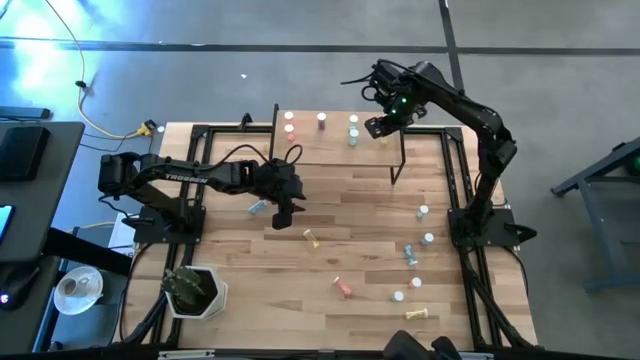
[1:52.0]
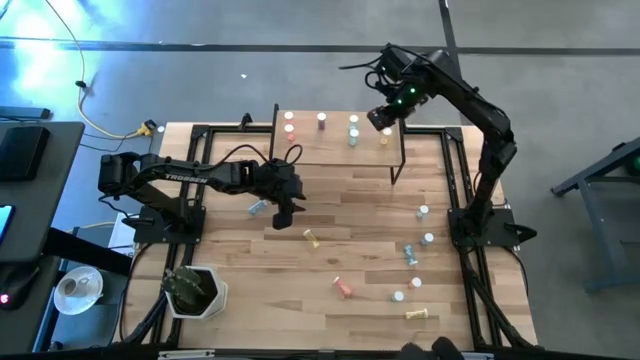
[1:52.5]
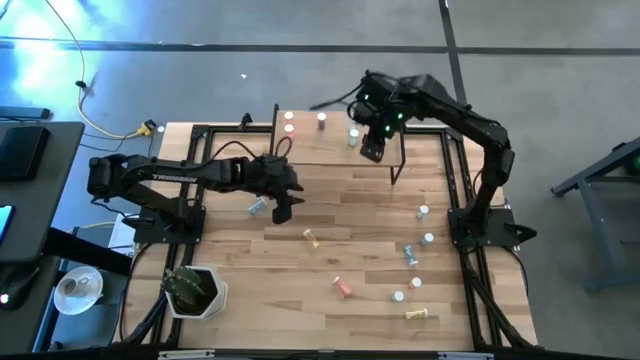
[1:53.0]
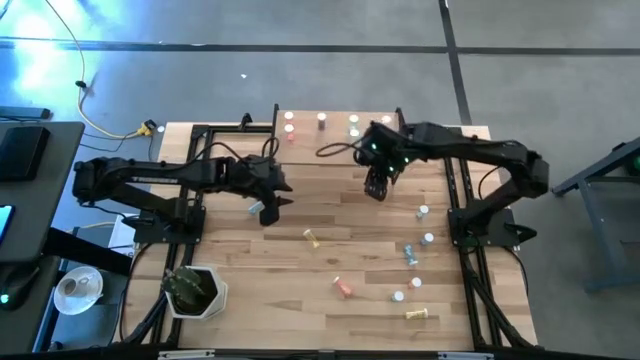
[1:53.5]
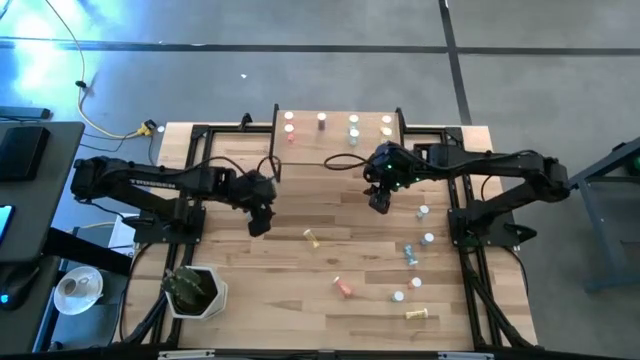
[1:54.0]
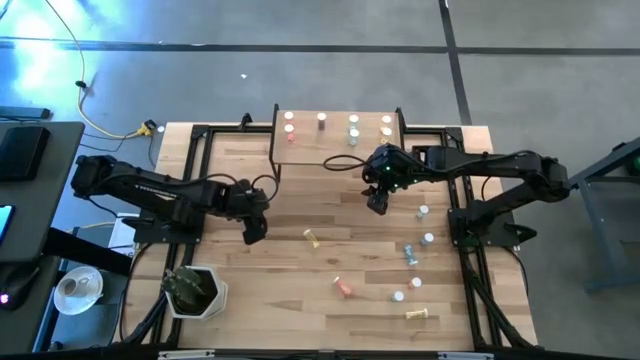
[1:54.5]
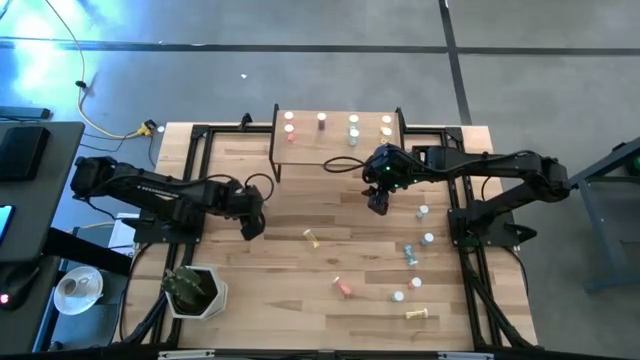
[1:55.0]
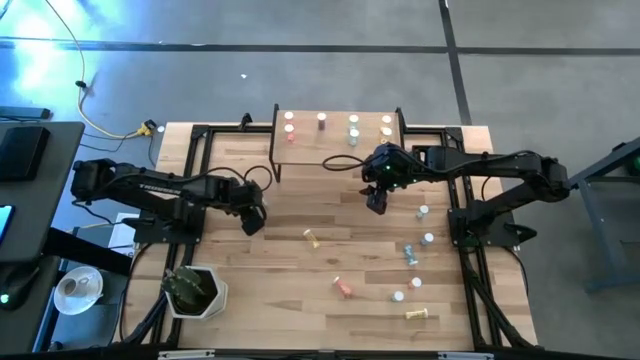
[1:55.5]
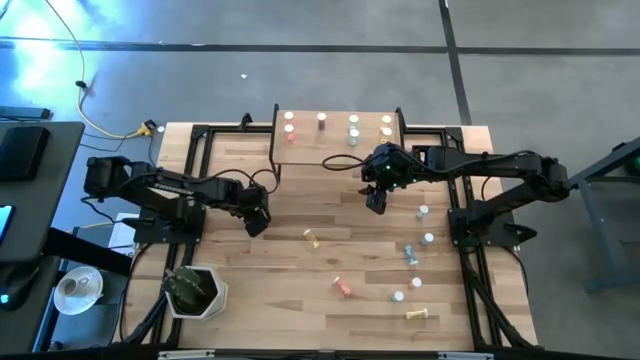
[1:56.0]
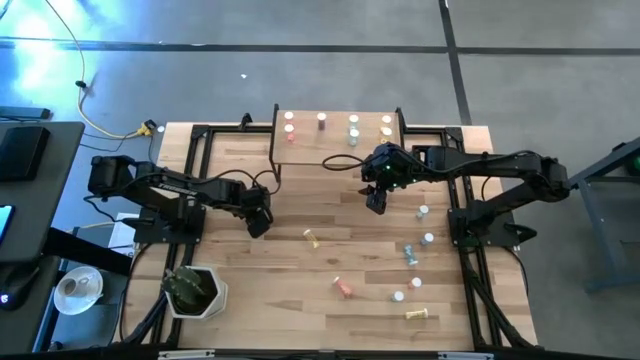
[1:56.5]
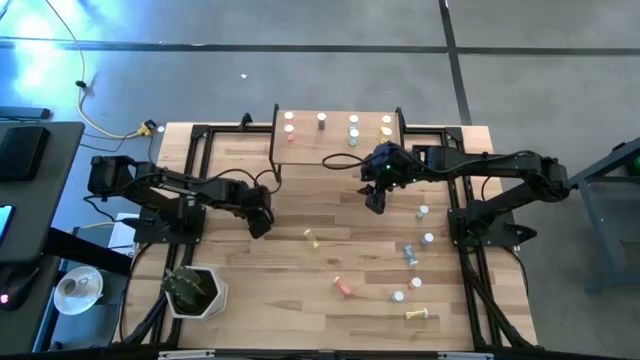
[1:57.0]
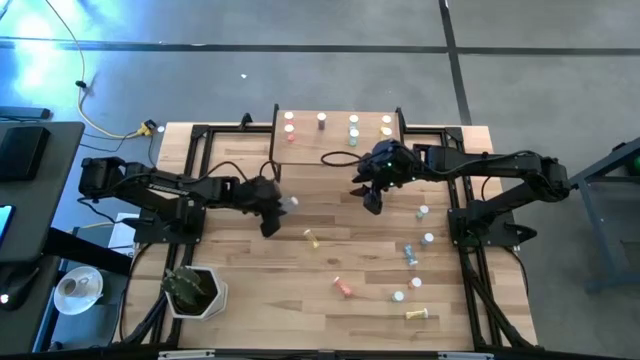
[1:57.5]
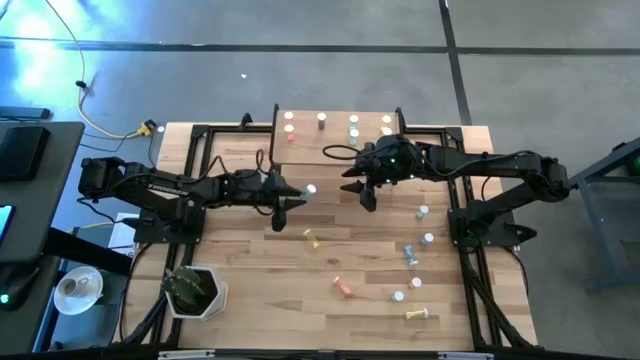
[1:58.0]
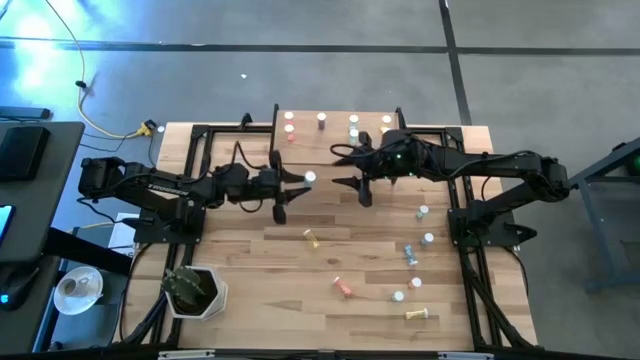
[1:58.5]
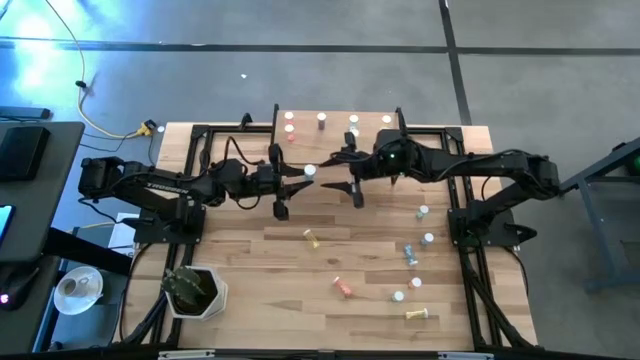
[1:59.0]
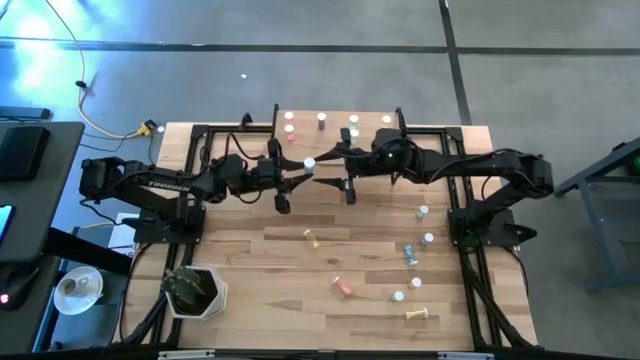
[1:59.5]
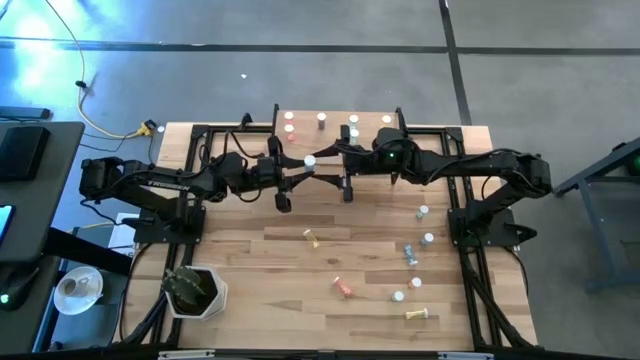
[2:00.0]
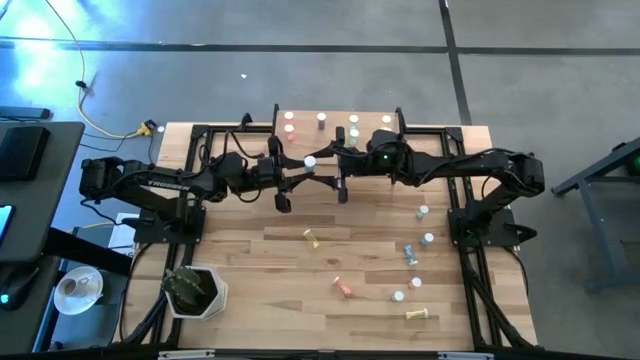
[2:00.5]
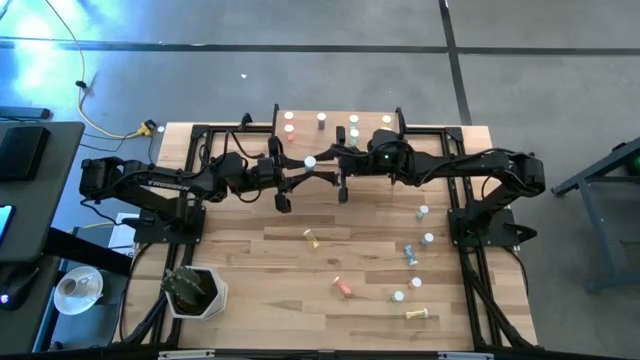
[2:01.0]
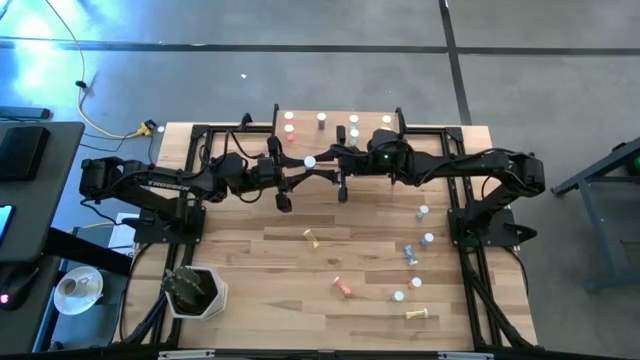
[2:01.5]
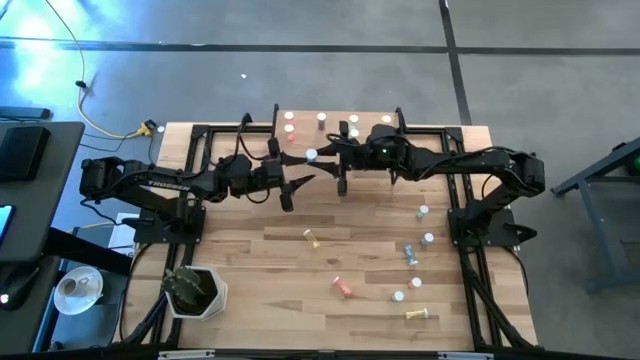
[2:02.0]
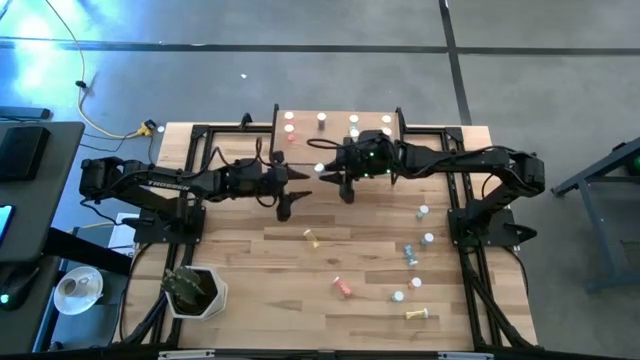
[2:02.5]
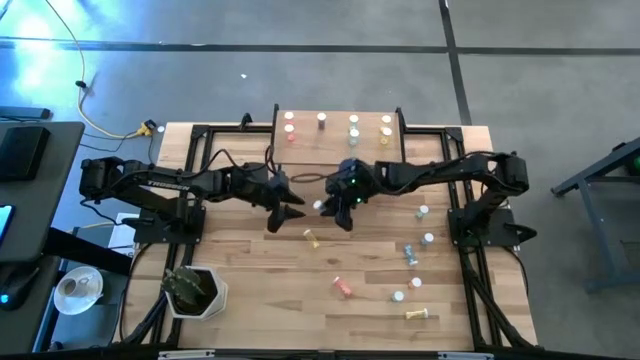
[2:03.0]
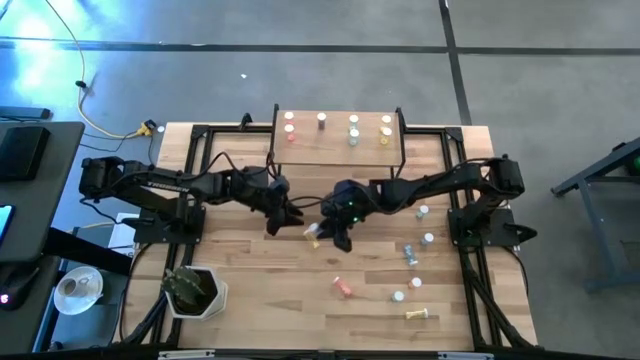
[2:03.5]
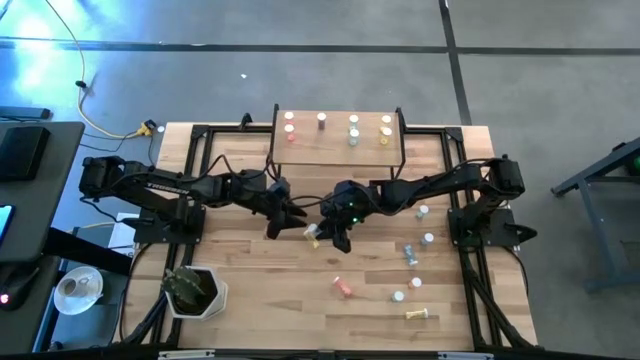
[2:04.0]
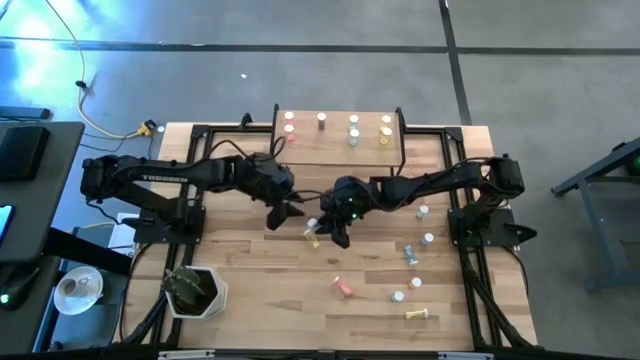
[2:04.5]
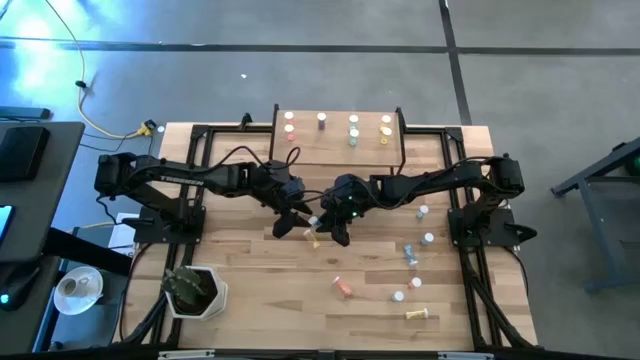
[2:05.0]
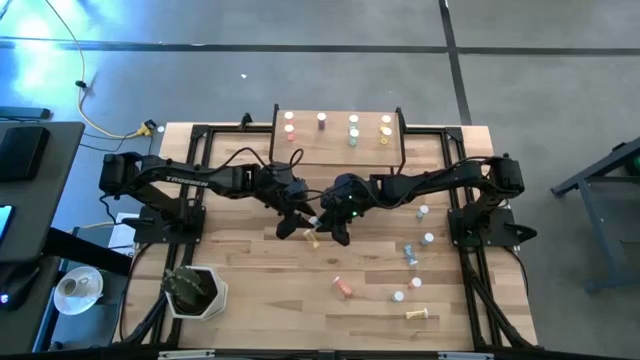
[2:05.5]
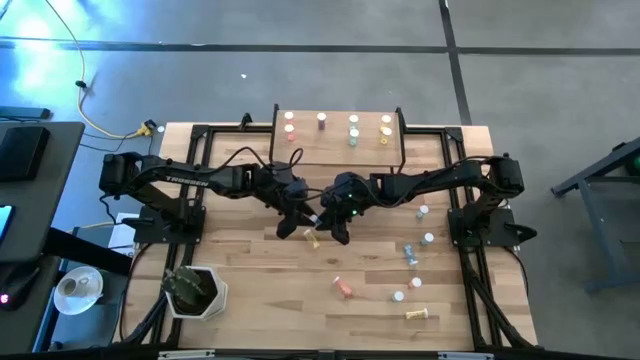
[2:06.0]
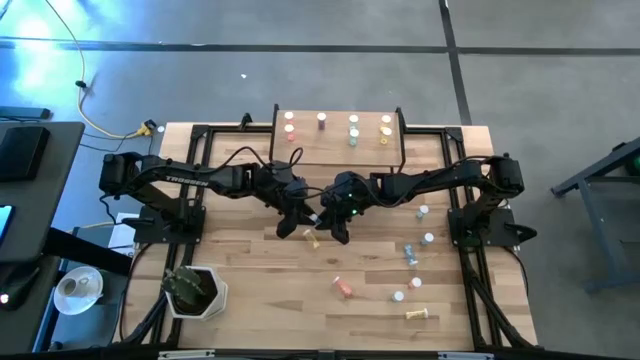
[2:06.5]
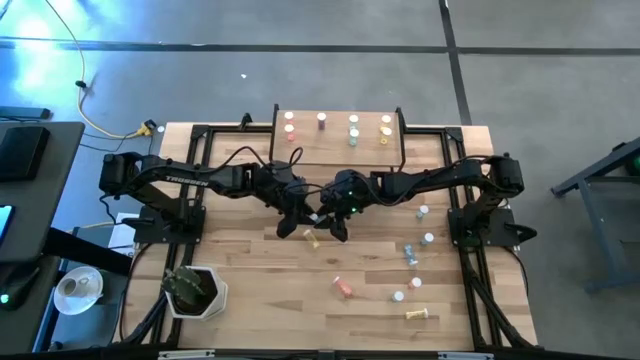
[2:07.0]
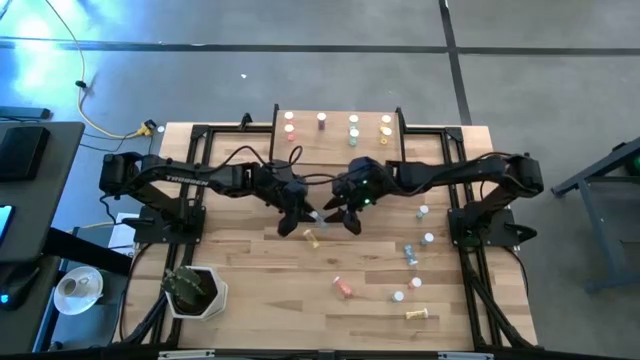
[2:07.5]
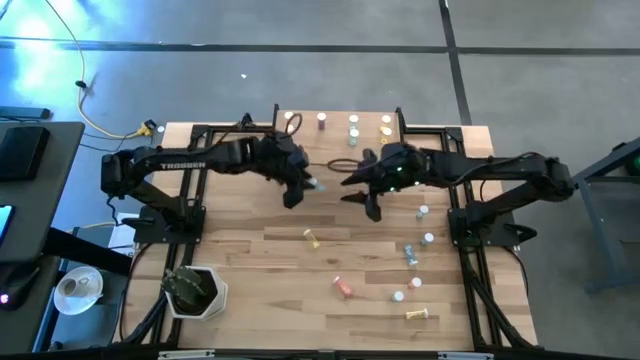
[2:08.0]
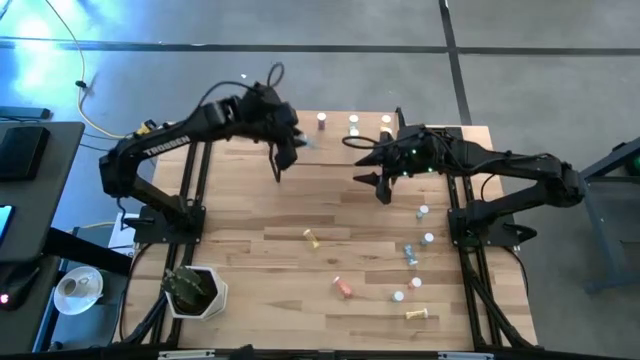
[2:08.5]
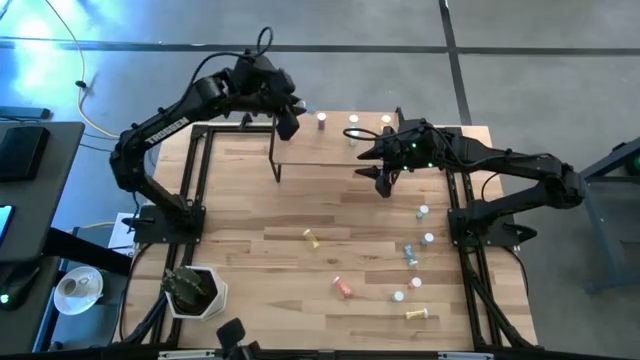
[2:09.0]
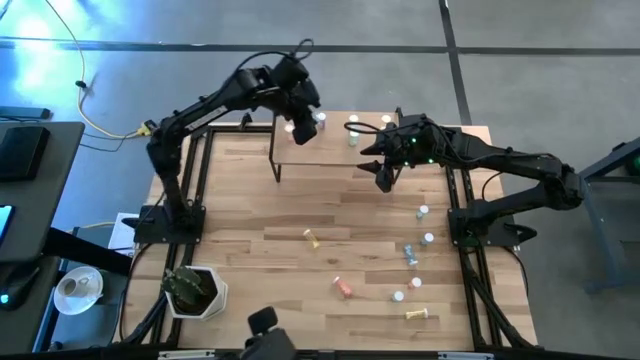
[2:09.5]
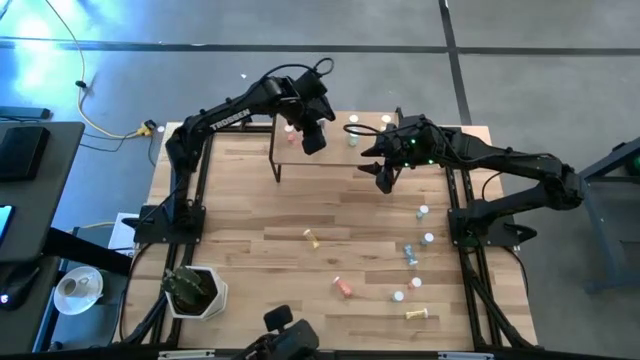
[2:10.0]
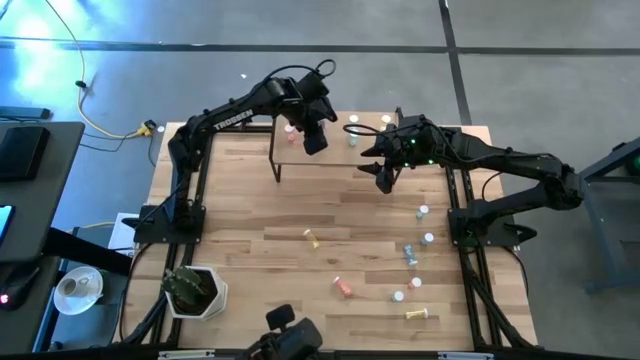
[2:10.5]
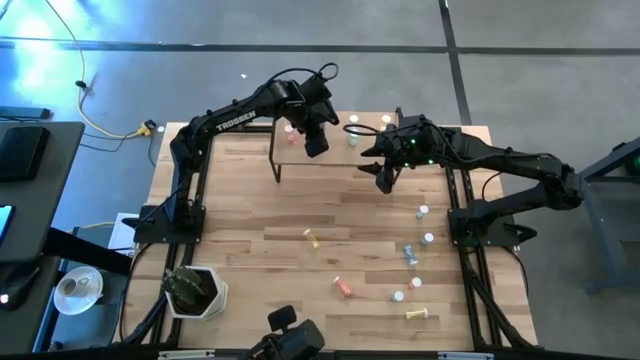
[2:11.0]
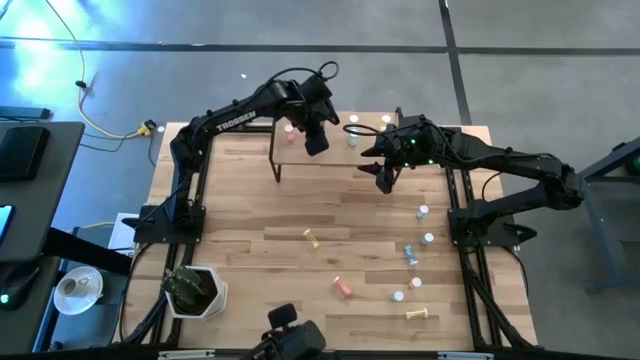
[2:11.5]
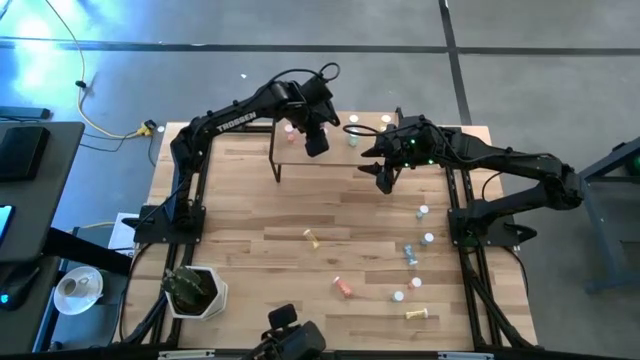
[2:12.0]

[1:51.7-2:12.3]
Task: Pick and place medicine bottles onto shelf by color
Put the blue pill bottle on the shelf aligned with the other blue pill bottle
